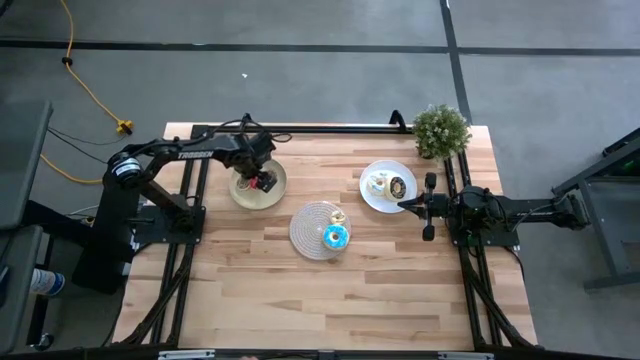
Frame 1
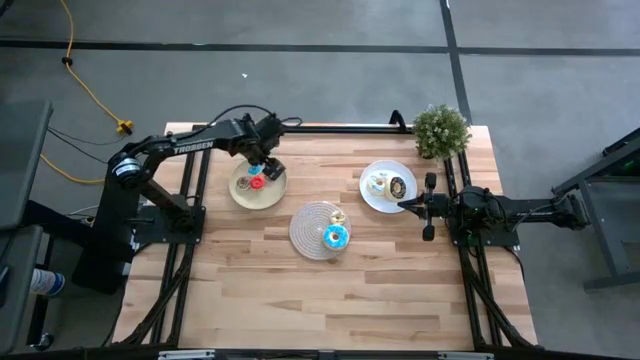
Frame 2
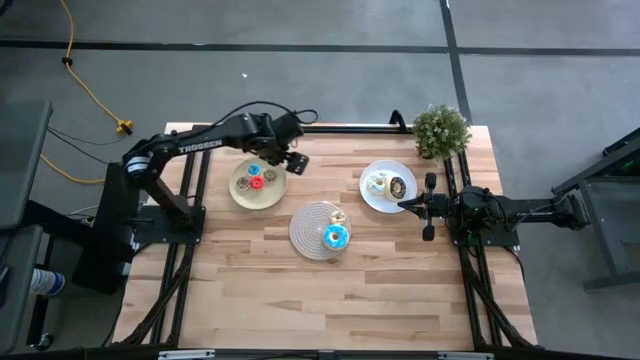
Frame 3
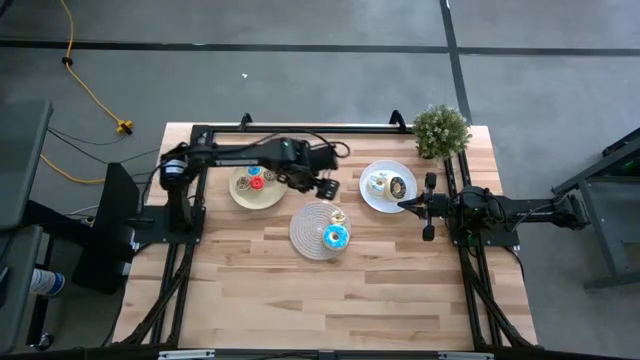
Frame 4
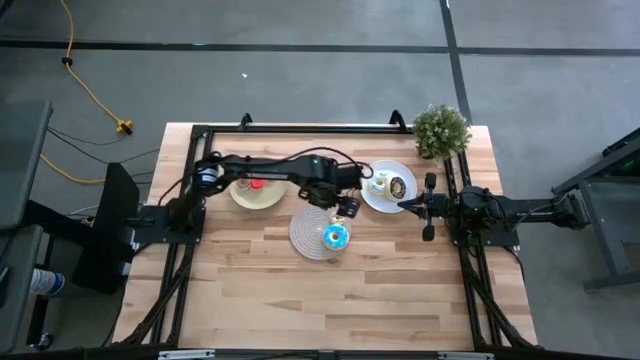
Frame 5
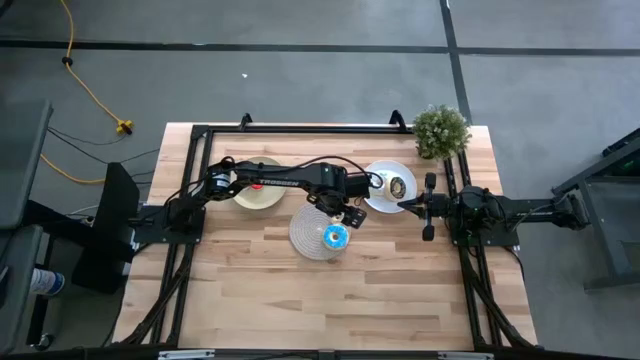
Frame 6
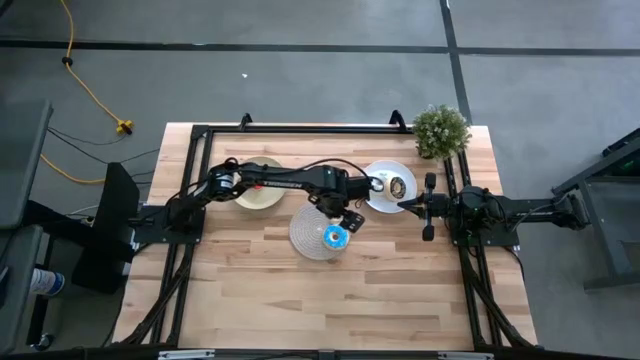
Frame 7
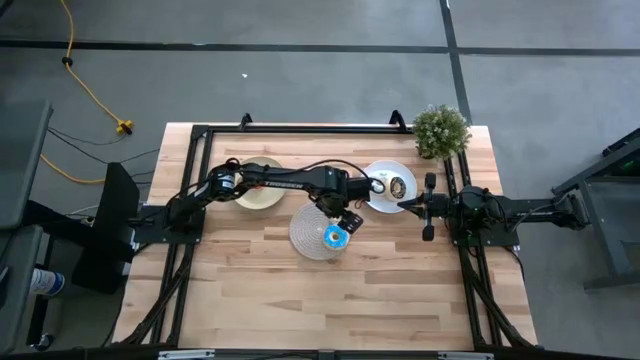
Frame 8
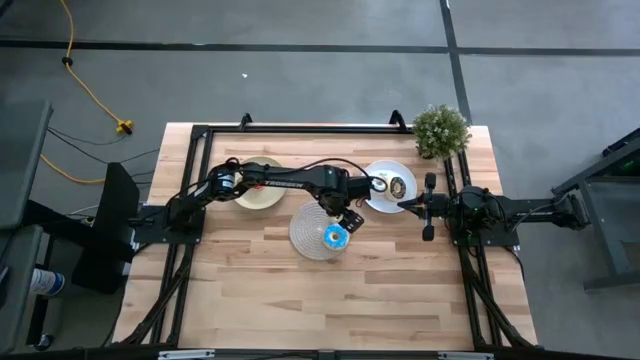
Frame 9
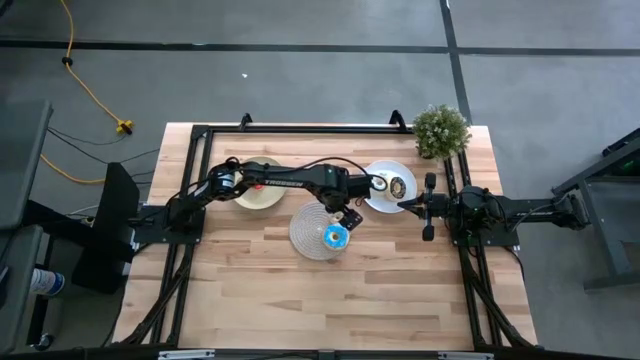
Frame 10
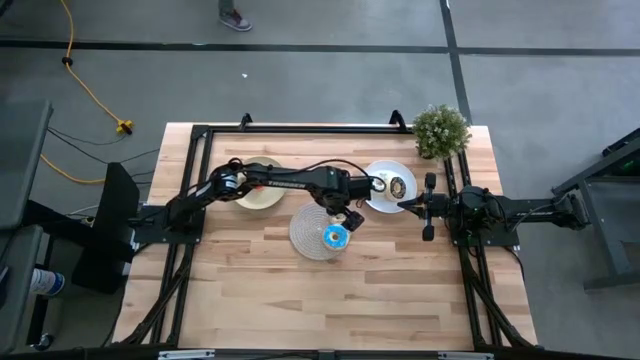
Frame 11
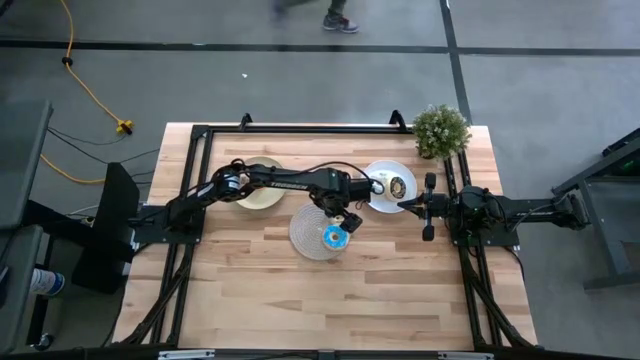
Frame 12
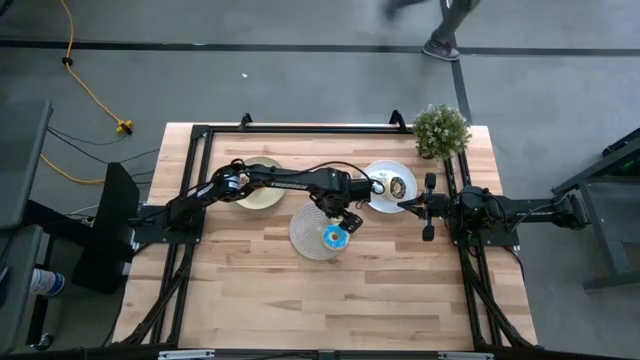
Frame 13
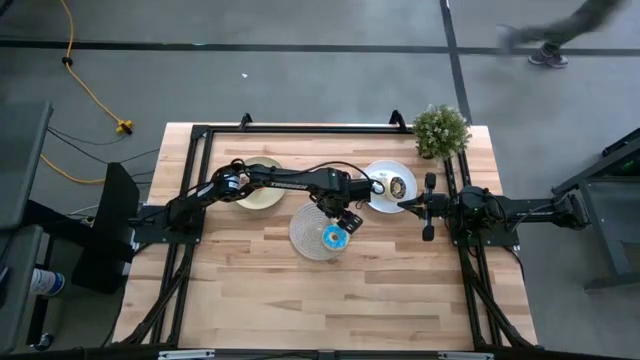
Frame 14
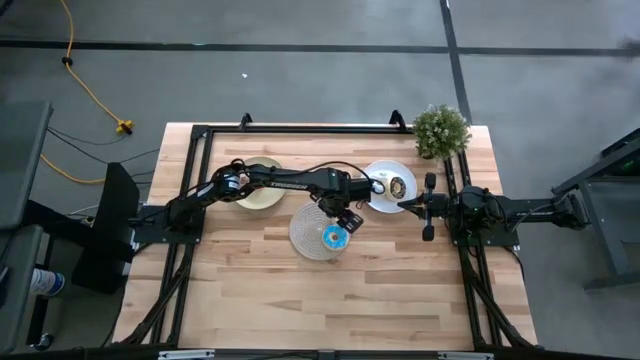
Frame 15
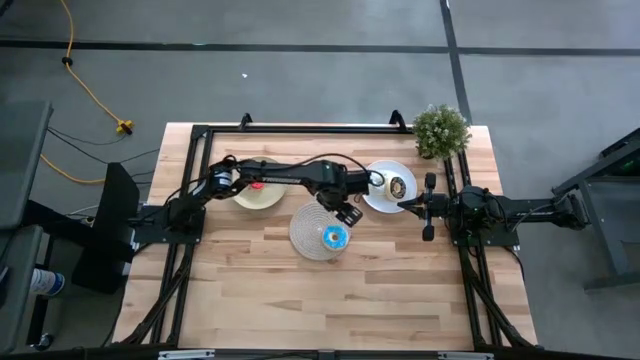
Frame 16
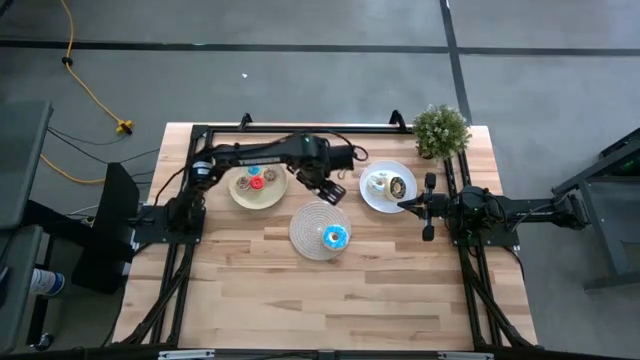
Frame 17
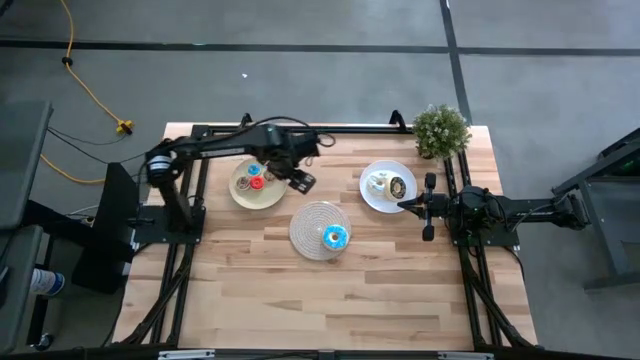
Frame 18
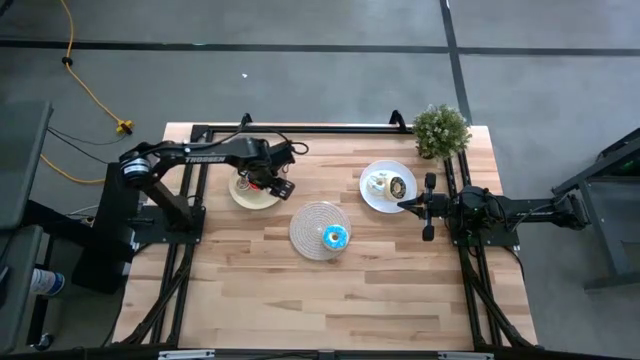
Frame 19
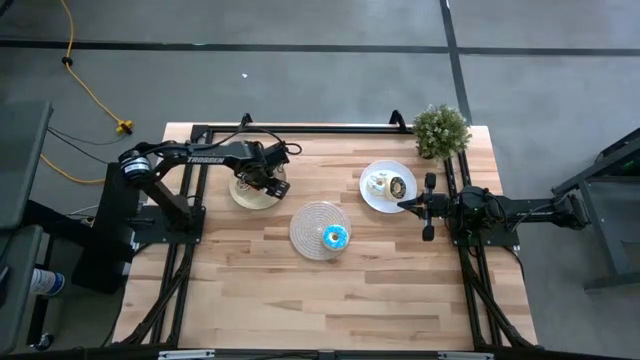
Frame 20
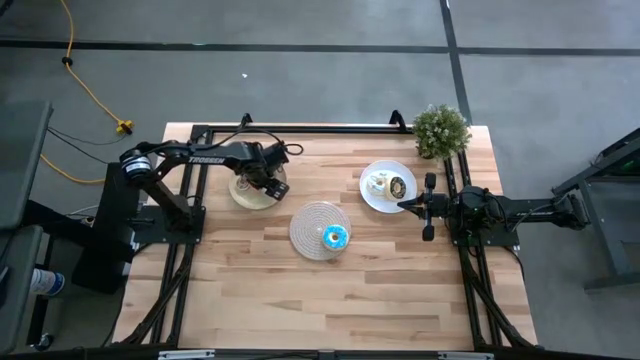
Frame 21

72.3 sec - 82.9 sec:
Task: Pick & Place donuts
Put the small white donut on the brown plate

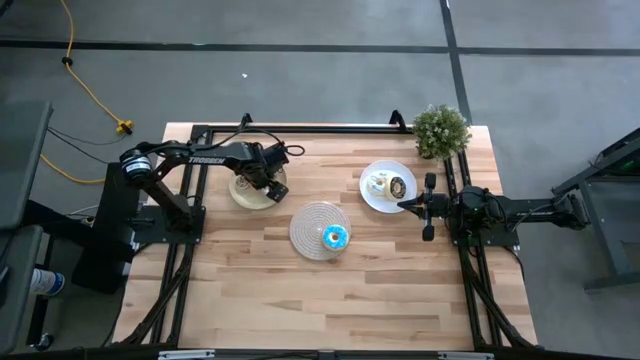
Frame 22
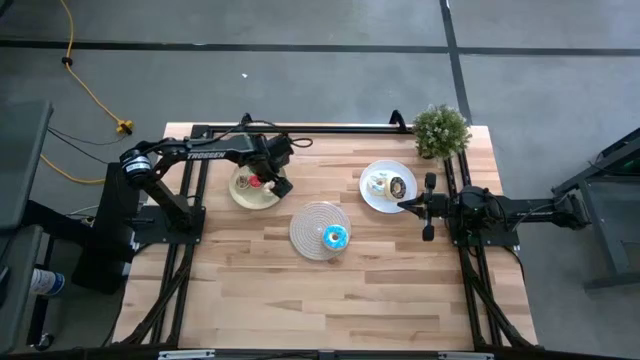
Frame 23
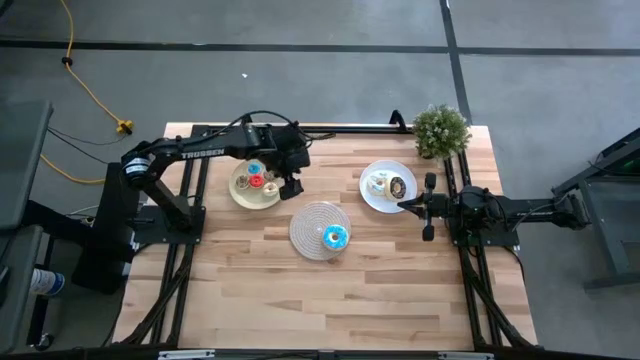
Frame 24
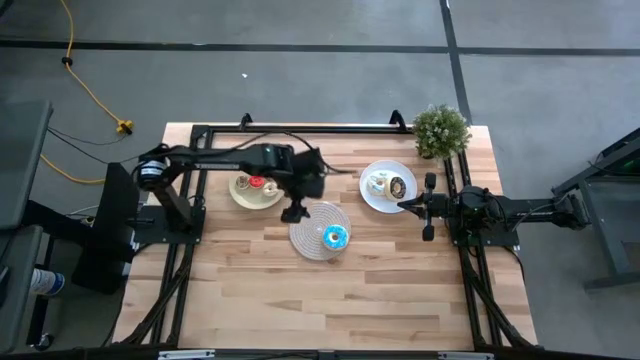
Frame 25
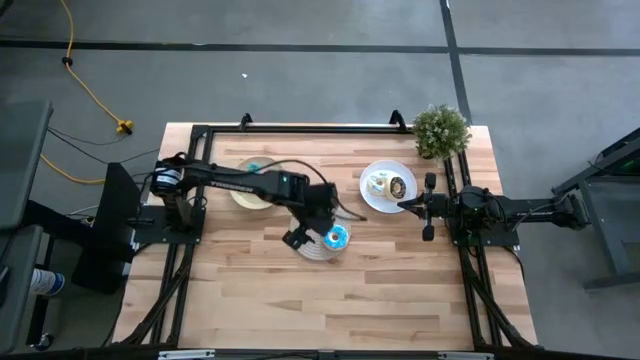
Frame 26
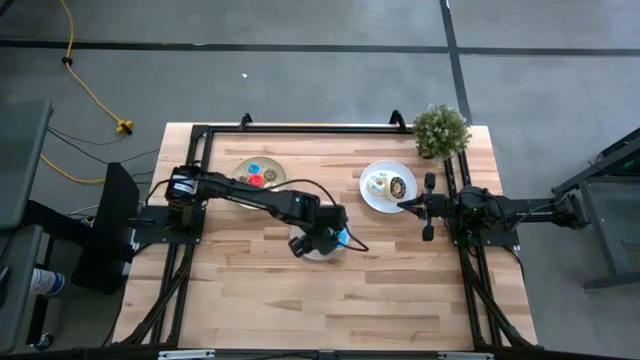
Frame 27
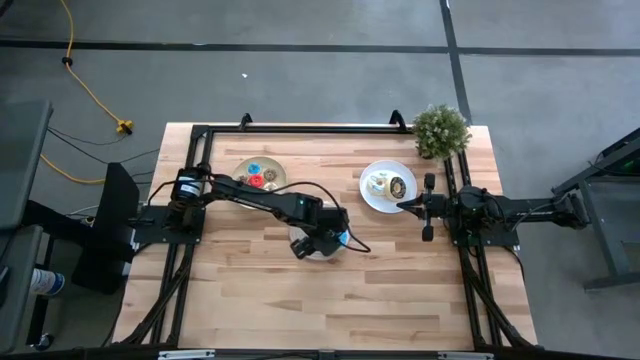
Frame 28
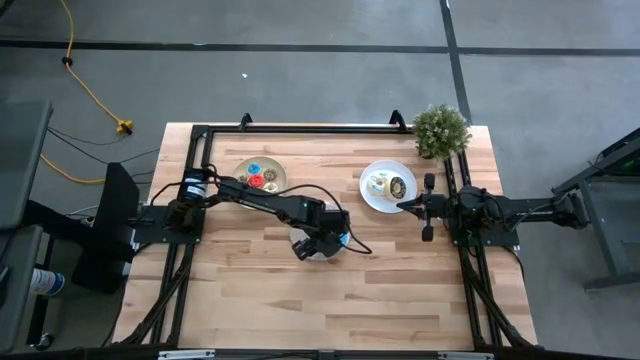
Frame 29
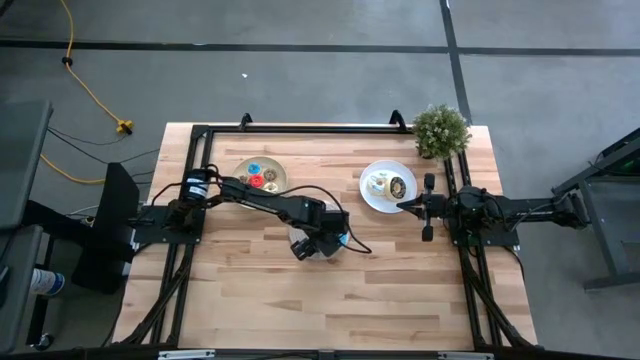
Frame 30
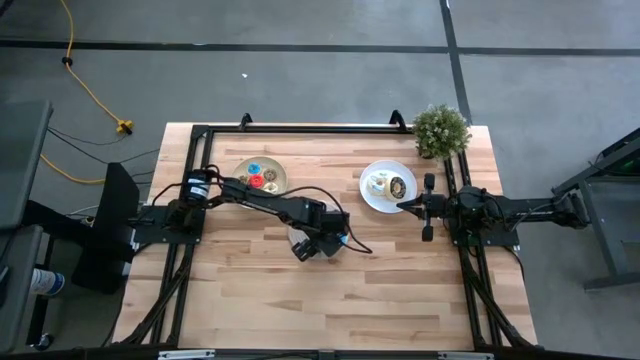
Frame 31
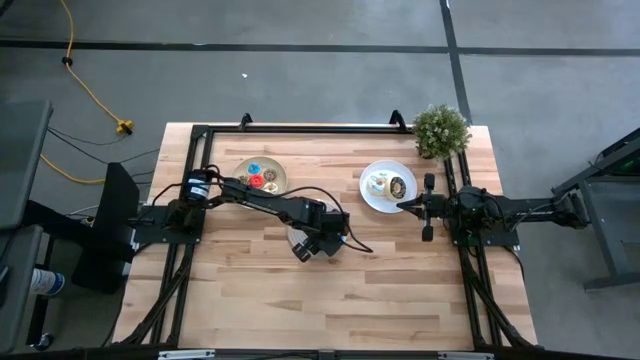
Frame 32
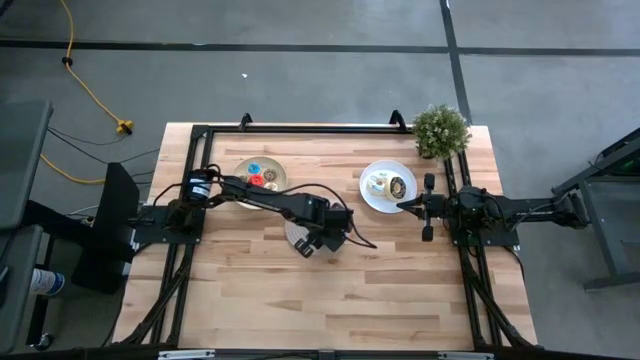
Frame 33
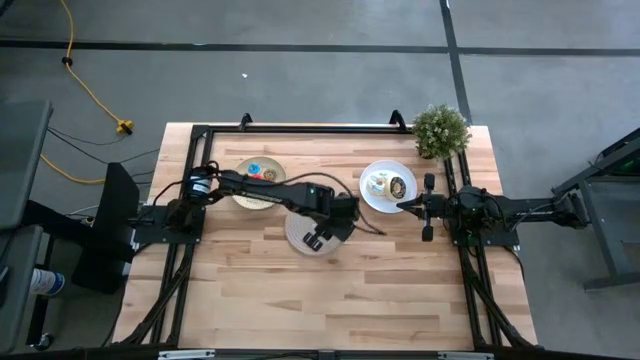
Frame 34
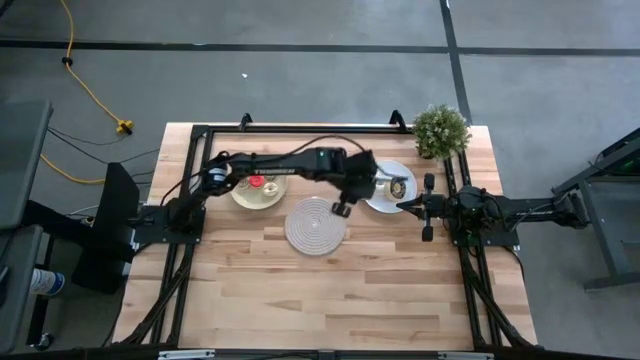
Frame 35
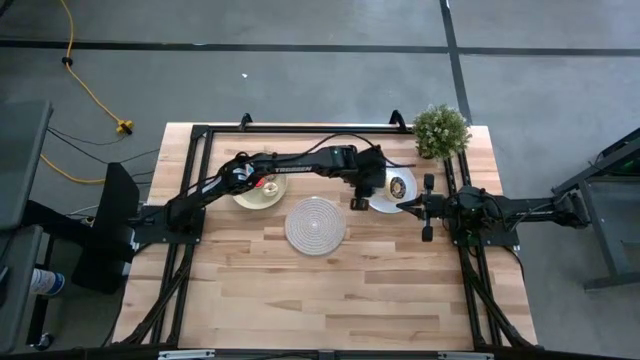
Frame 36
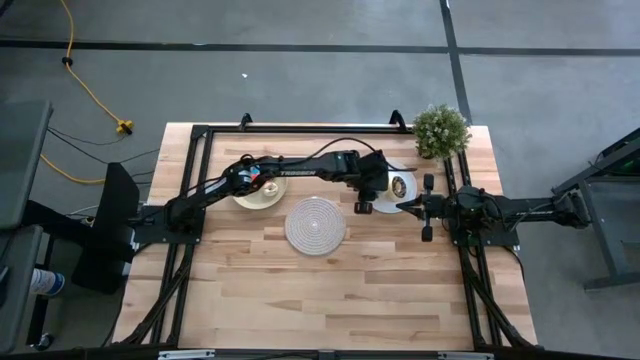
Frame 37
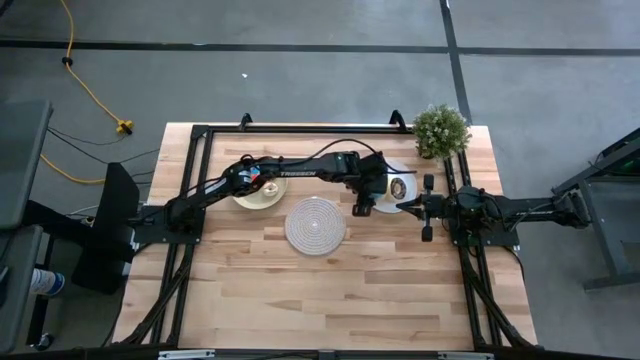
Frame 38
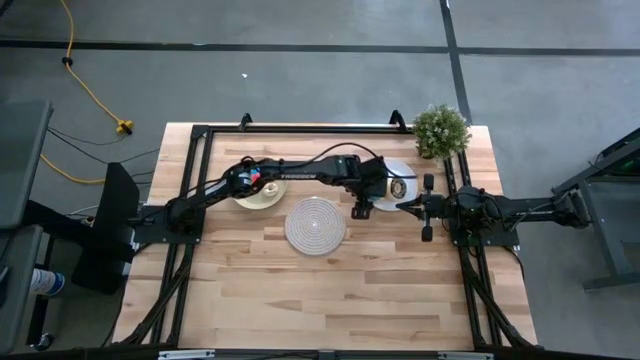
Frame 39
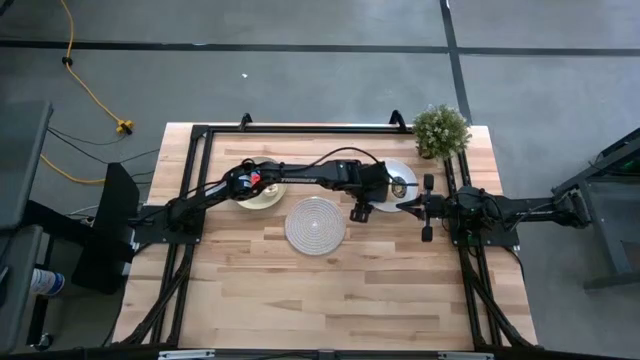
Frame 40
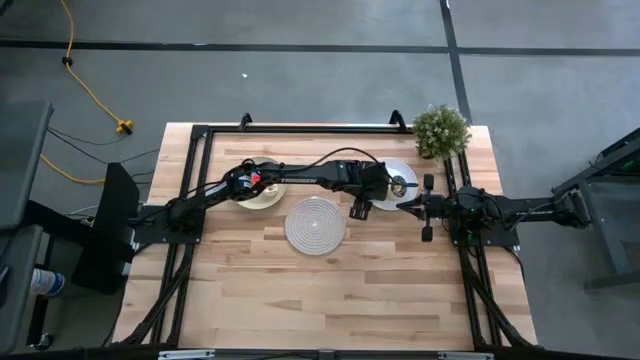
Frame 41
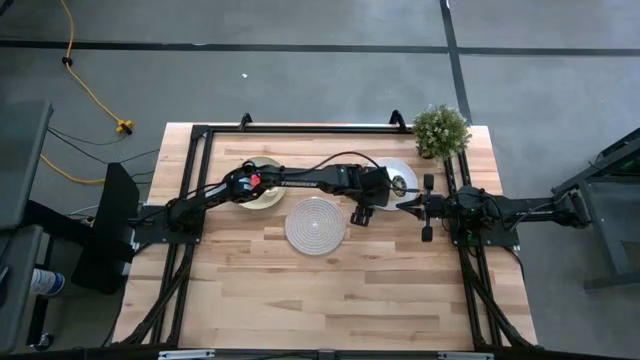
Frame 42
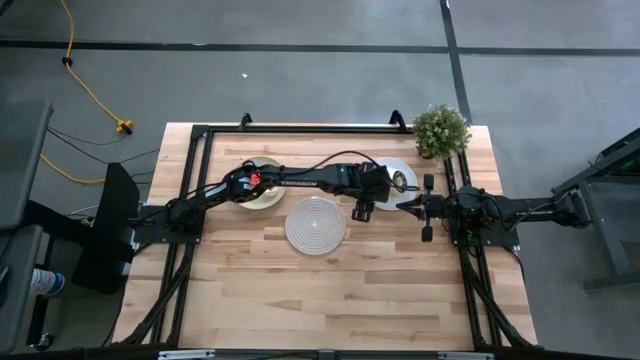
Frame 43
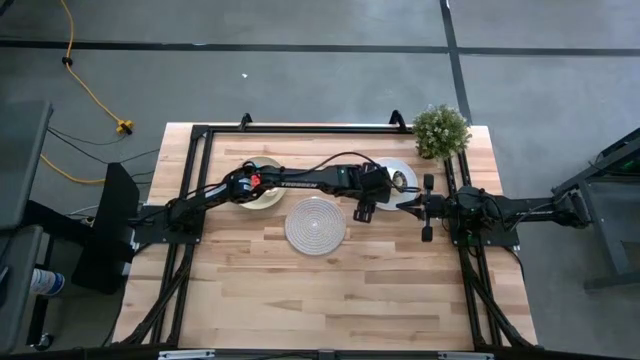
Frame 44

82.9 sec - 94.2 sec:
Put the large blue donut on the white plate
